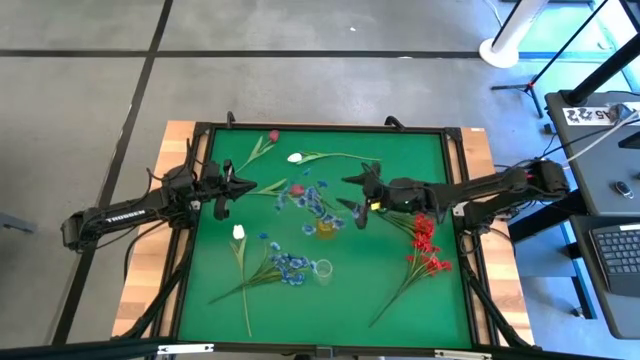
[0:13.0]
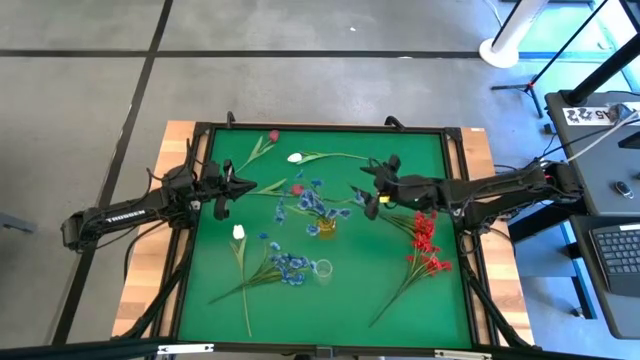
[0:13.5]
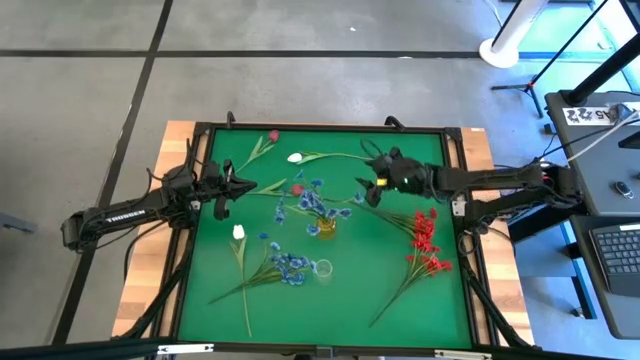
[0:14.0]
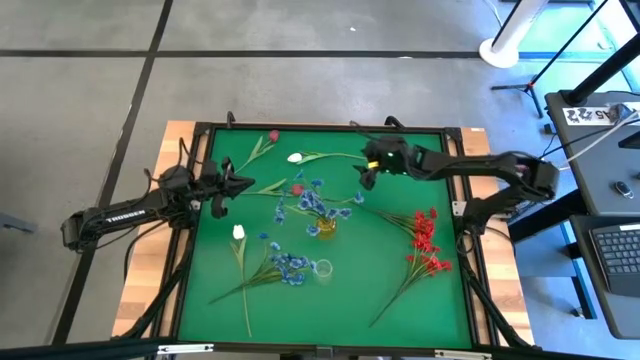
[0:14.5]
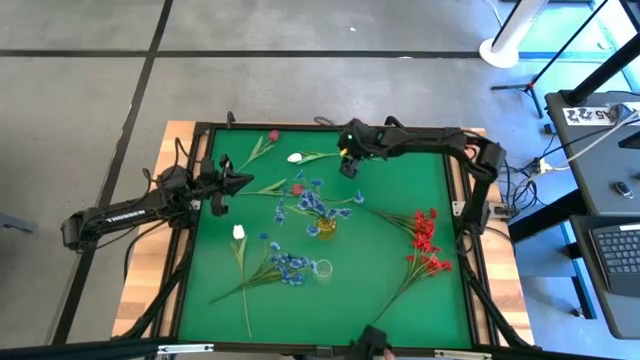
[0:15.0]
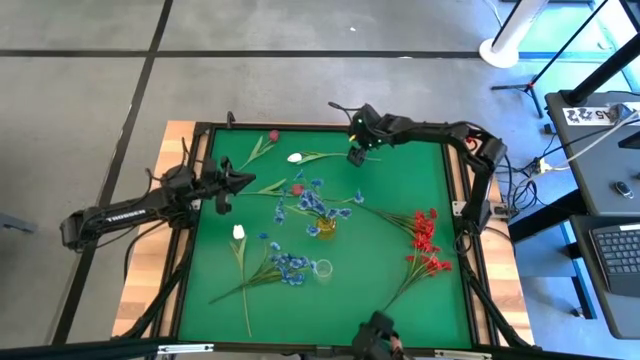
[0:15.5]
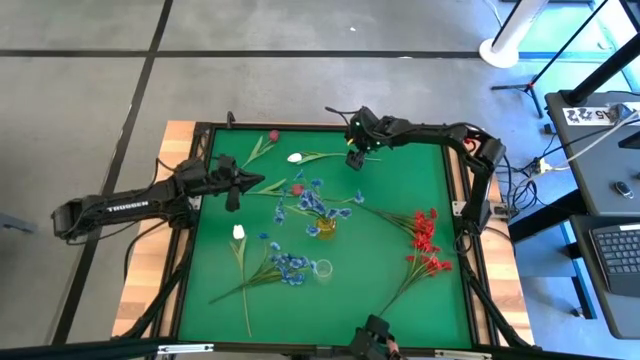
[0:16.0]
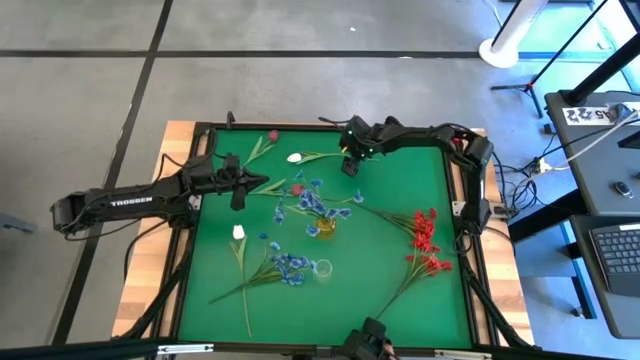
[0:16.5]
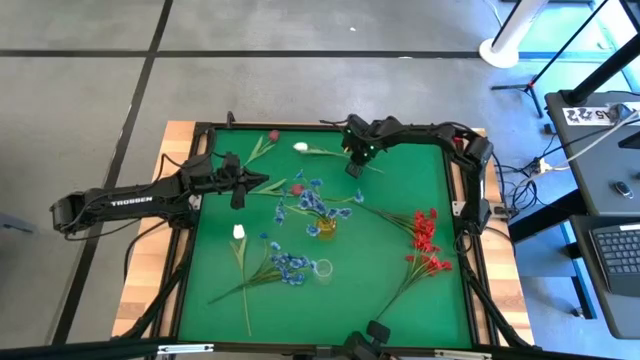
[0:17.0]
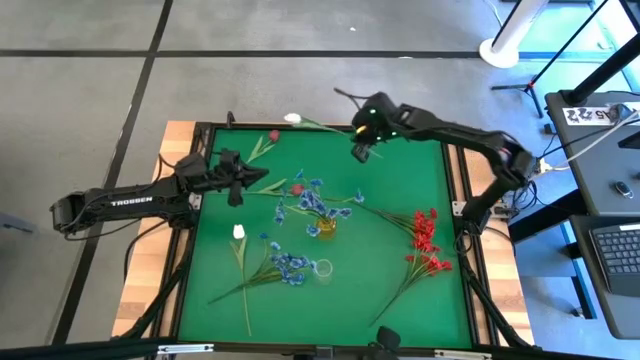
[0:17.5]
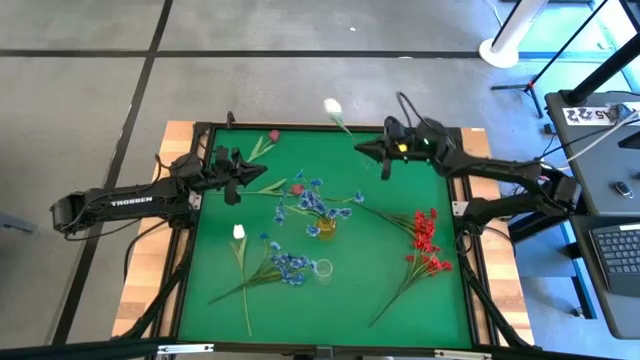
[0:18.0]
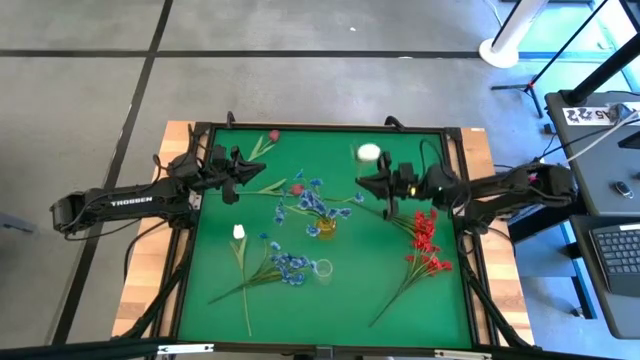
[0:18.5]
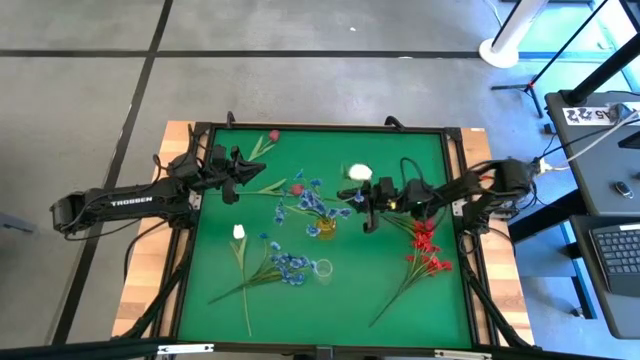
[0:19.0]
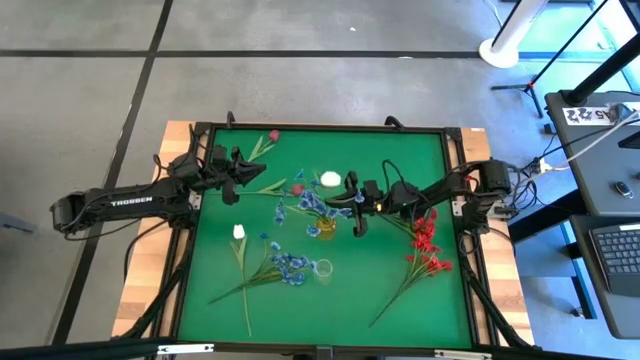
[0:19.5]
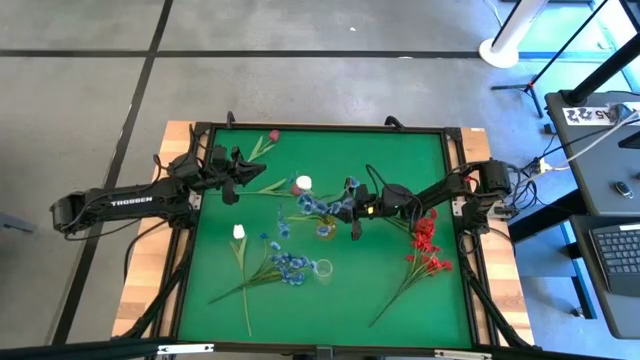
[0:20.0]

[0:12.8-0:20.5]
Task: Sort flowers into vase by color
Put the top white flower into the yellow flower vase

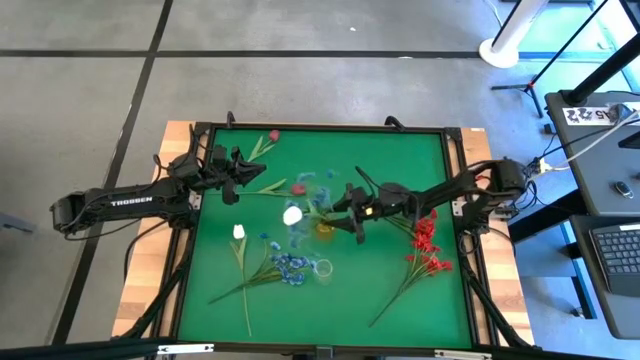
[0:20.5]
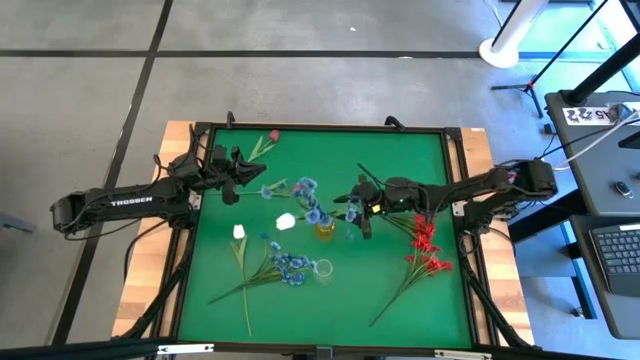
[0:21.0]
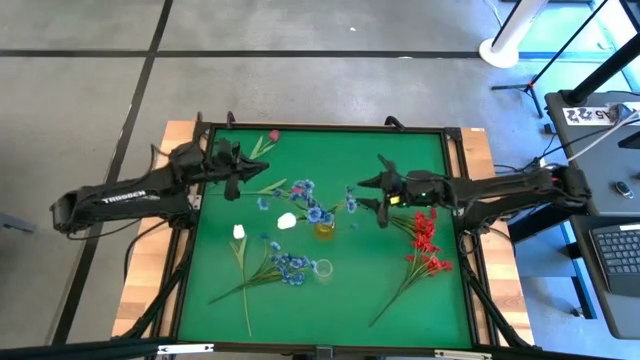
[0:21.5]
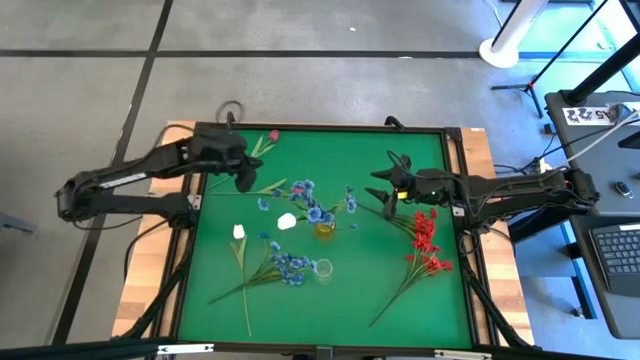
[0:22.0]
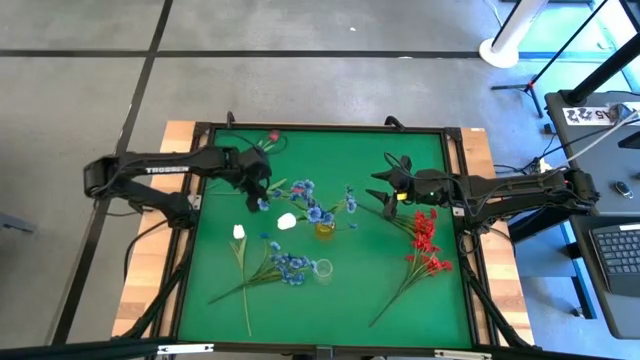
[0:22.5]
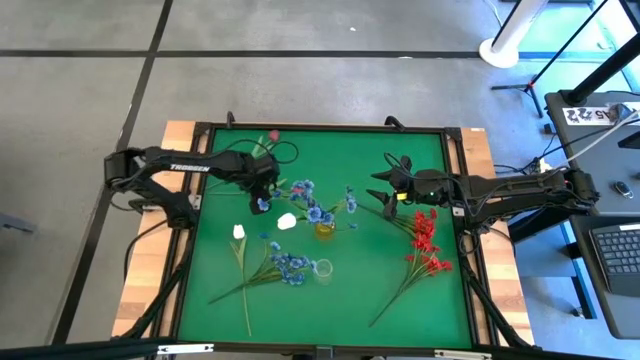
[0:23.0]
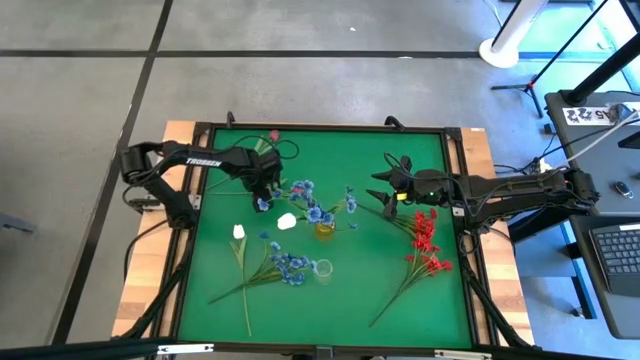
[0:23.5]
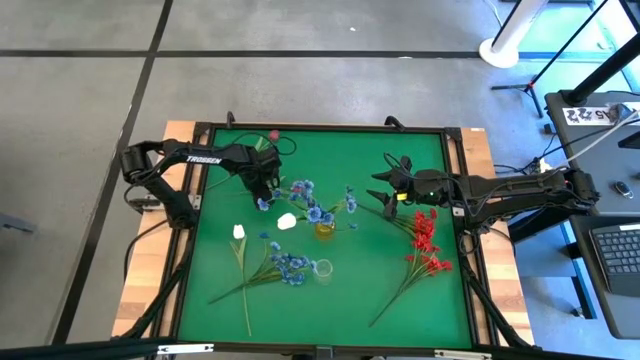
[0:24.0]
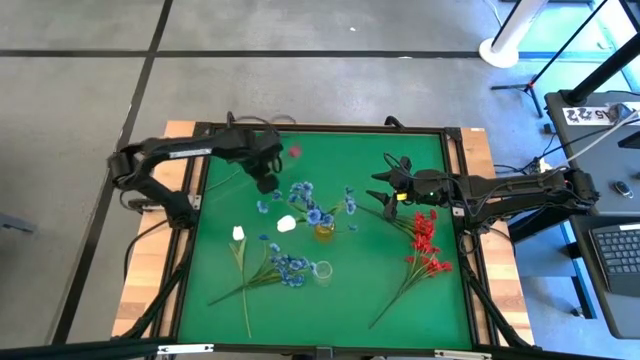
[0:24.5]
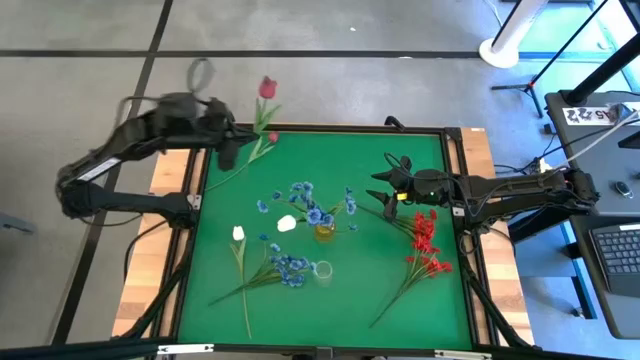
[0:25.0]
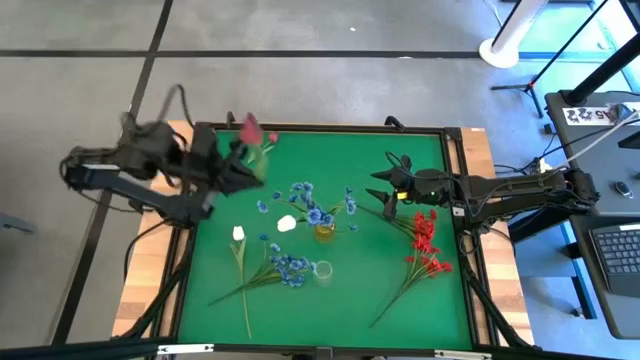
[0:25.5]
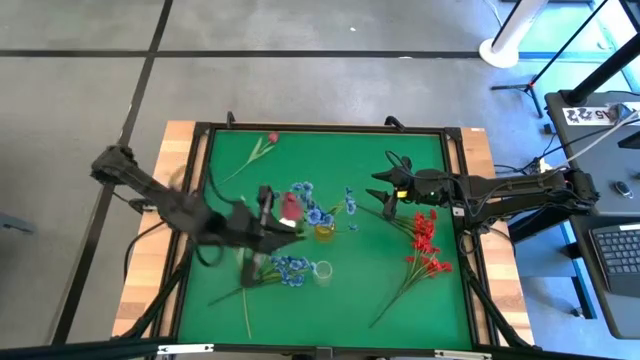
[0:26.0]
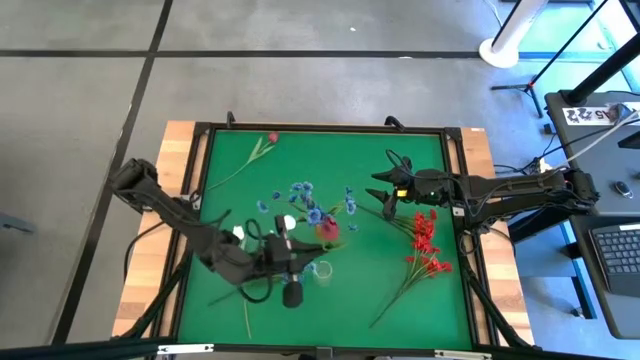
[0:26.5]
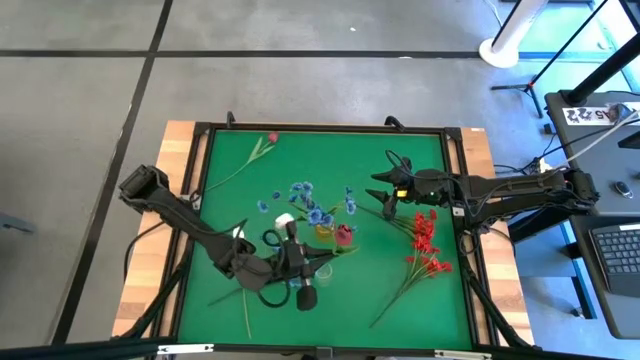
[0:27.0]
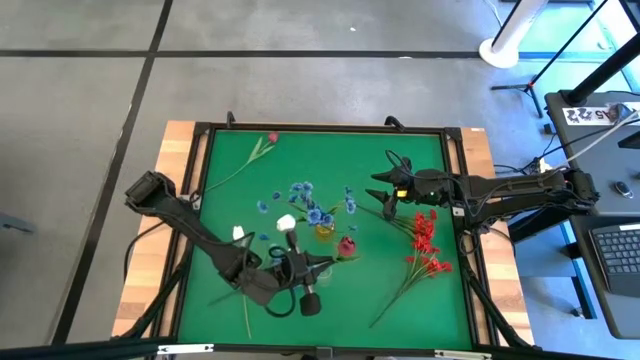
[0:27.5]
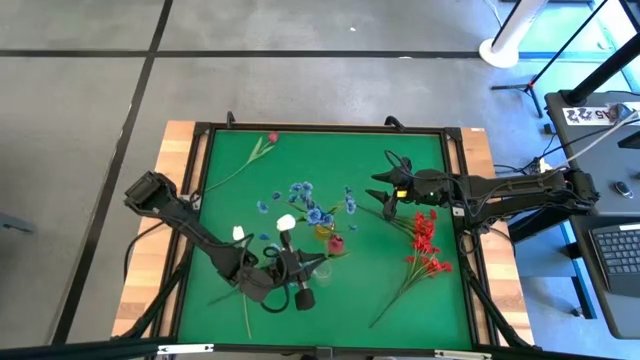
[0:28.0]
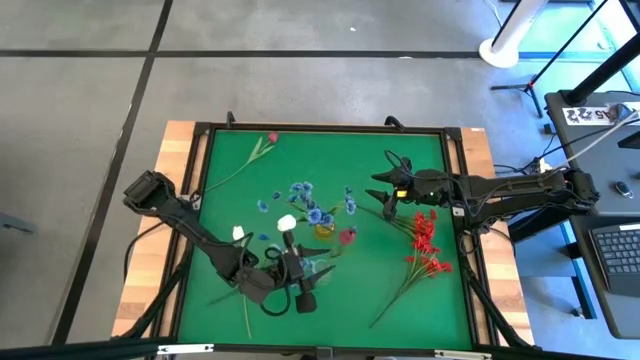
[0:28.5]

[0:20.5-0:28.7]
Put the bottom pink flower into the transparent flower vase

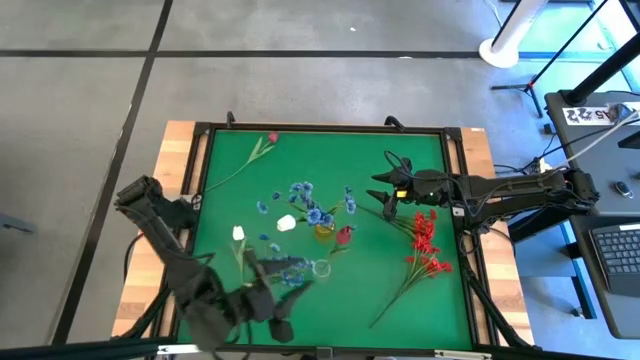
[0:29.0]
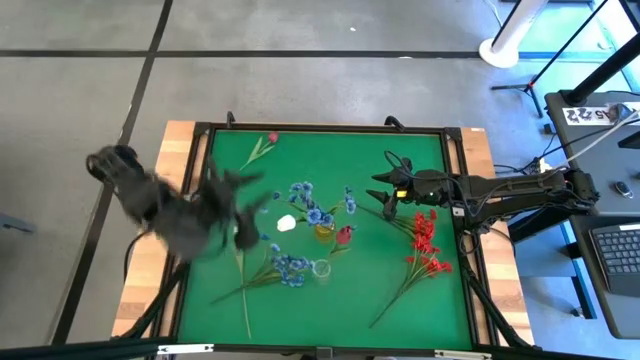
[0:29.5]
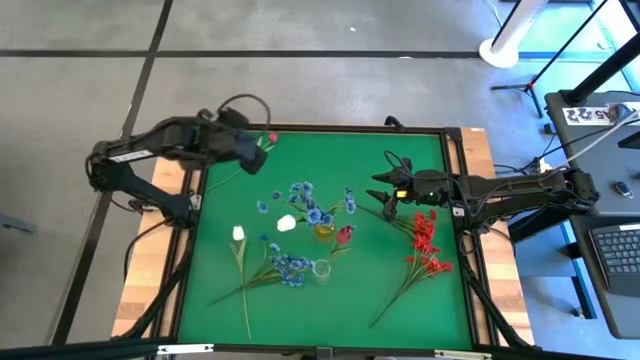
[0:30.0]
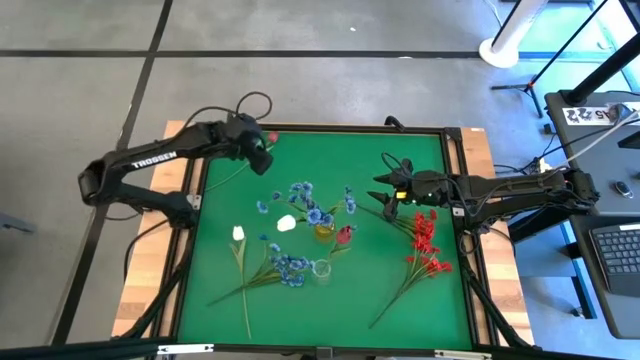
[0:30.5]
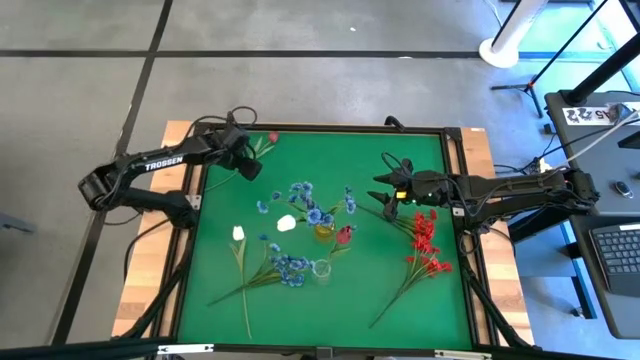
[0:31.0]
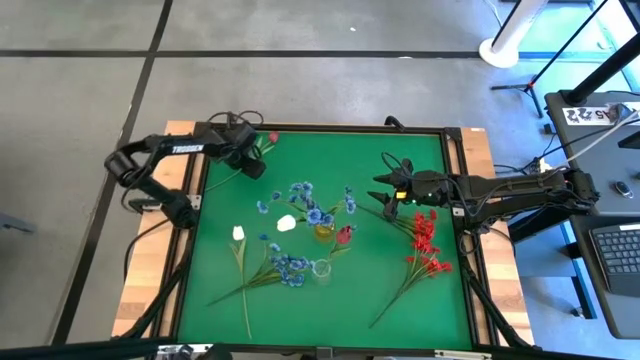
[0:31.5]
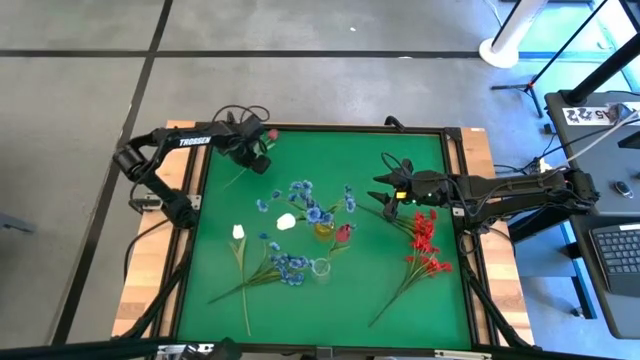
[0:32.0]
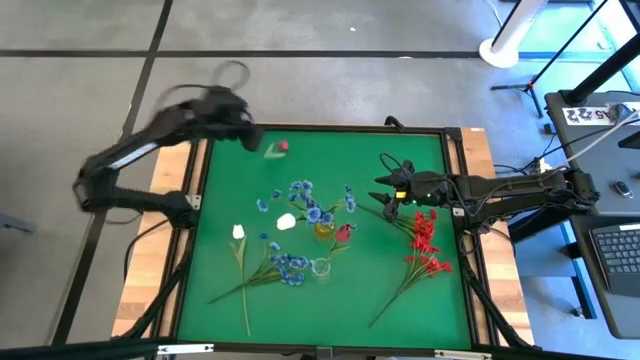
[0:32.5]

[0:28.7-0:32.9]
Put the pink flower into the transparent flower vase

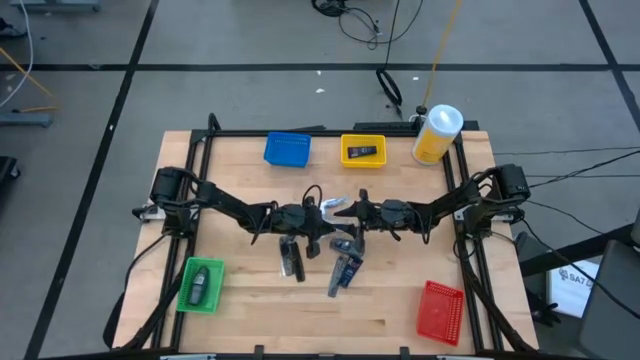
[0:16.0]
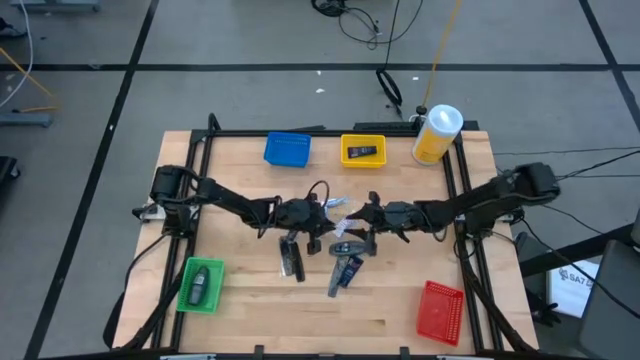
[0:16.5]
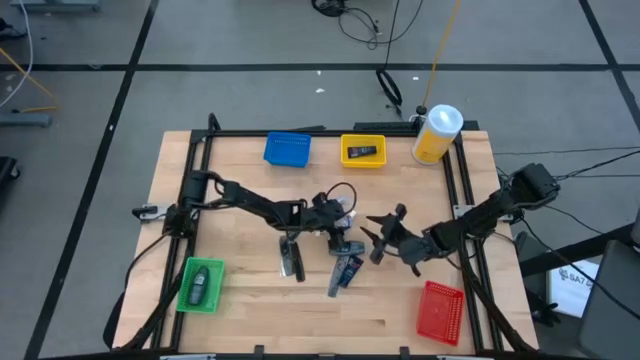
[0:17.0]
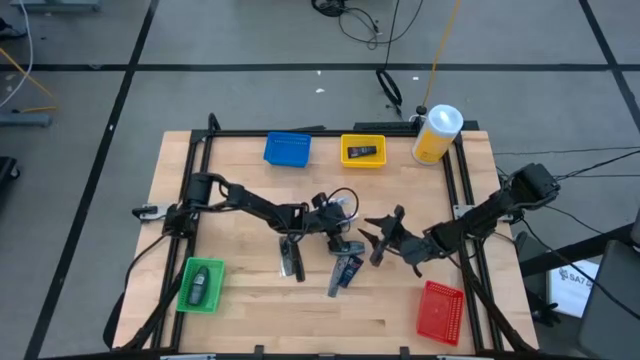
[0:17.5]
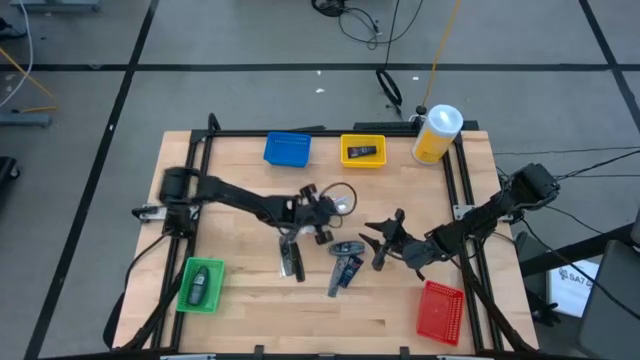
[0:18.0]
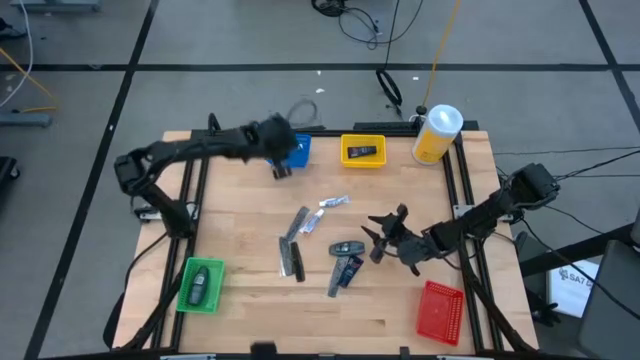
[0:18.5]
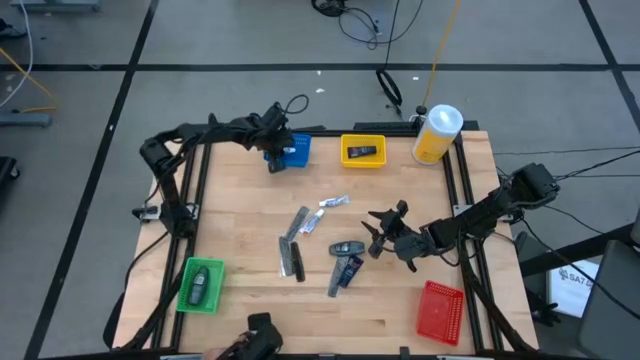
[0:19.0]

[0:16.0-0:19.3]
Task: Pick & Place Travel size toiletries
Put the white toothpaste into the blue bin
